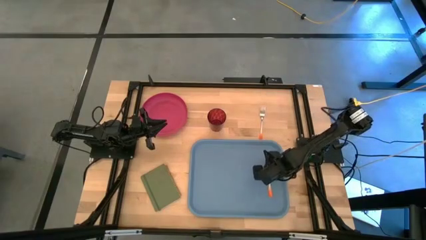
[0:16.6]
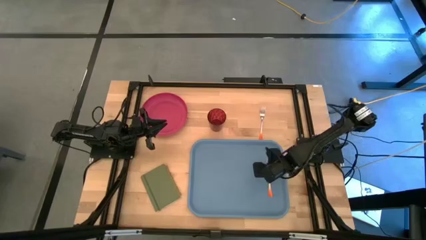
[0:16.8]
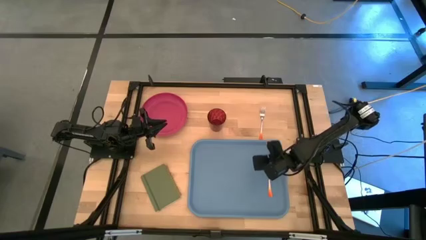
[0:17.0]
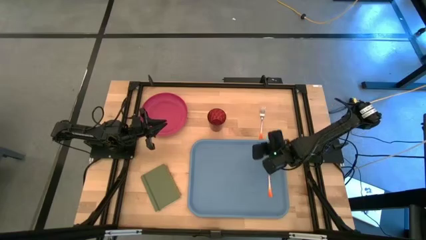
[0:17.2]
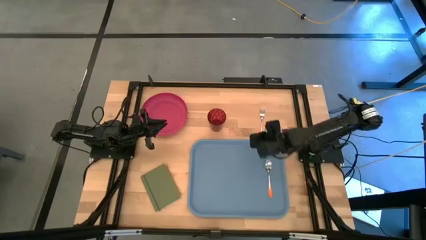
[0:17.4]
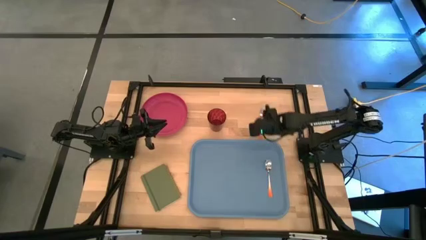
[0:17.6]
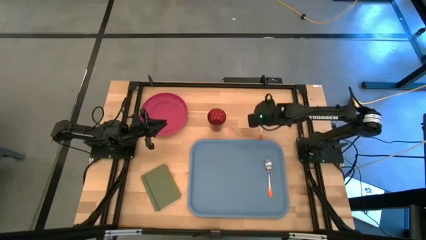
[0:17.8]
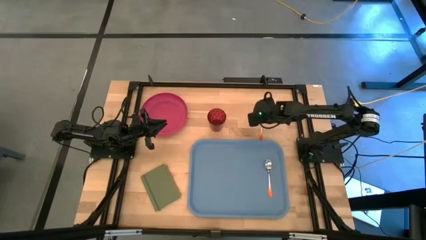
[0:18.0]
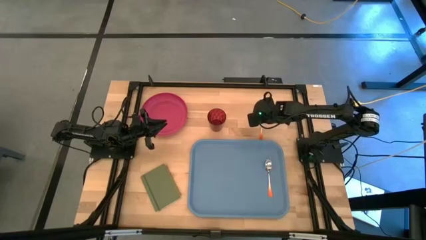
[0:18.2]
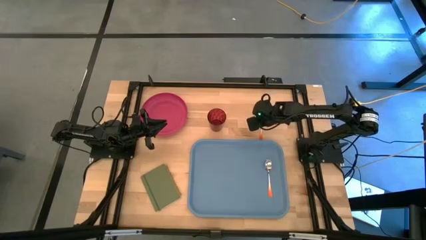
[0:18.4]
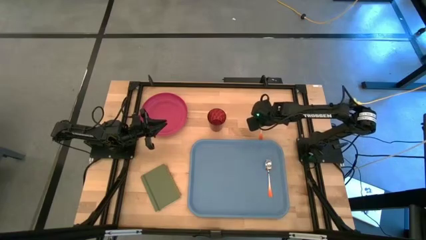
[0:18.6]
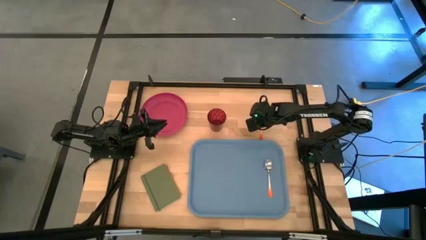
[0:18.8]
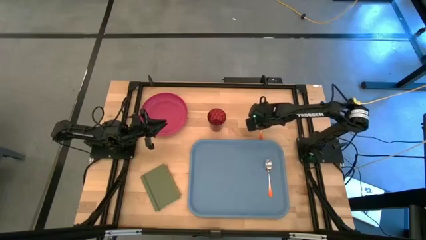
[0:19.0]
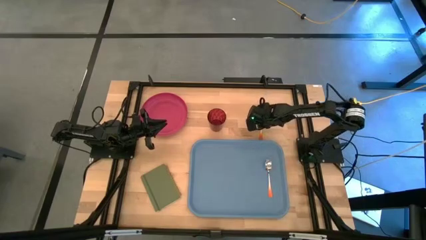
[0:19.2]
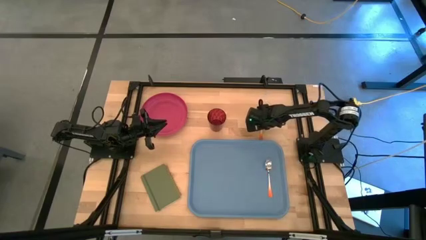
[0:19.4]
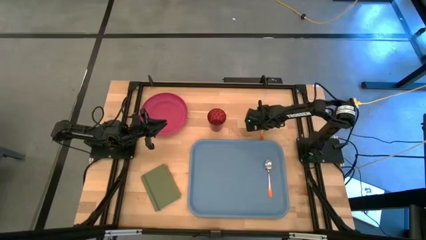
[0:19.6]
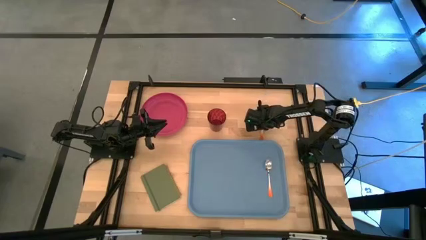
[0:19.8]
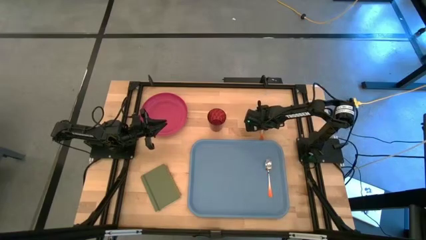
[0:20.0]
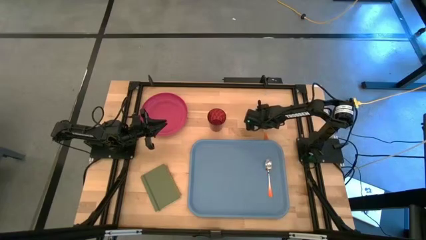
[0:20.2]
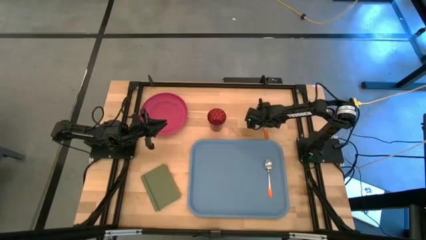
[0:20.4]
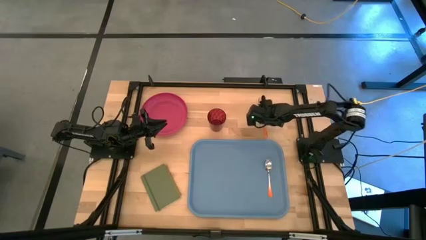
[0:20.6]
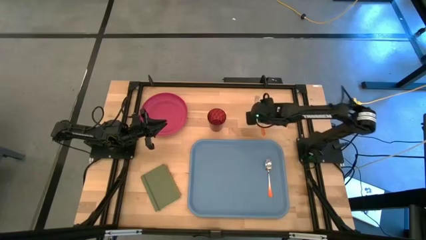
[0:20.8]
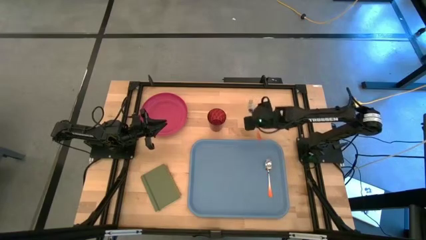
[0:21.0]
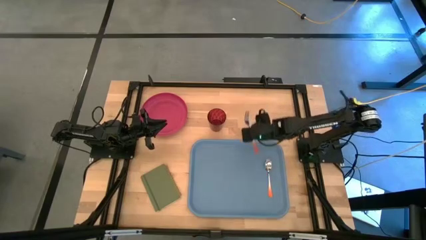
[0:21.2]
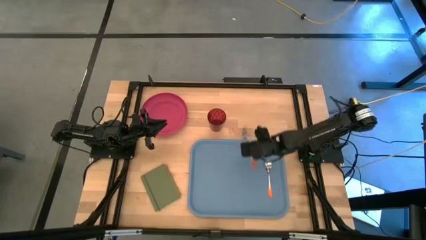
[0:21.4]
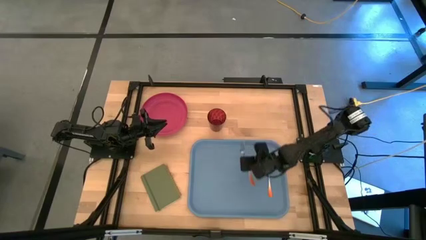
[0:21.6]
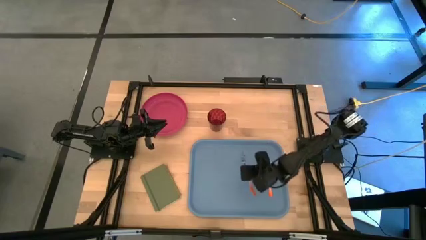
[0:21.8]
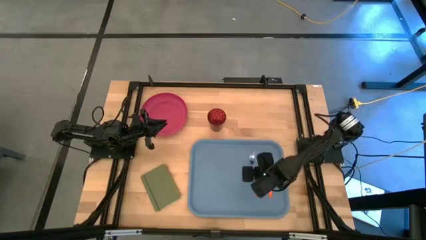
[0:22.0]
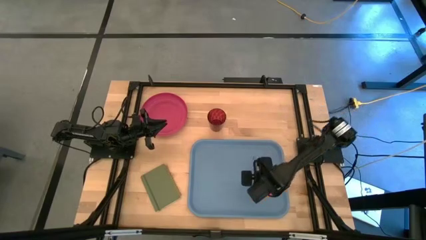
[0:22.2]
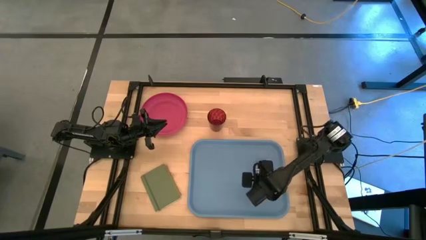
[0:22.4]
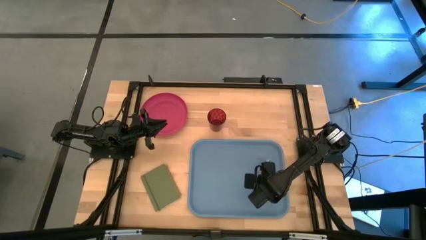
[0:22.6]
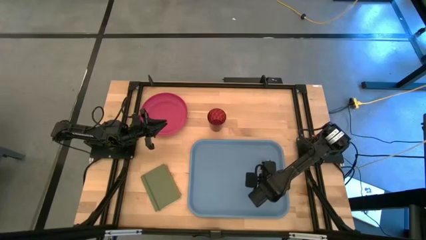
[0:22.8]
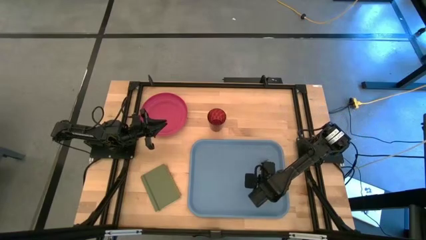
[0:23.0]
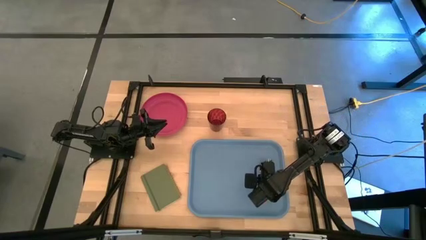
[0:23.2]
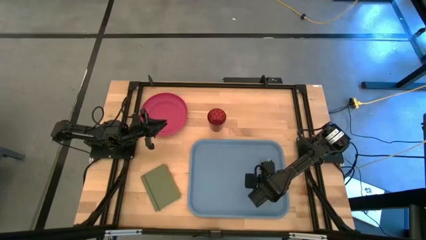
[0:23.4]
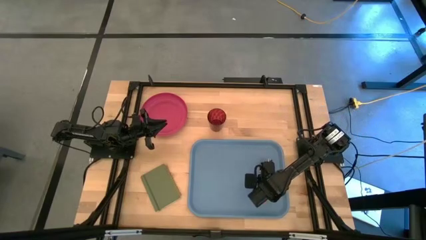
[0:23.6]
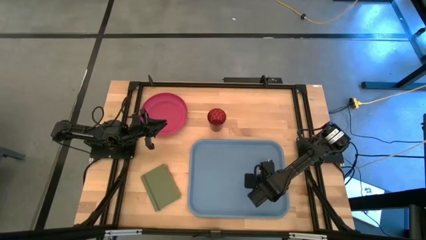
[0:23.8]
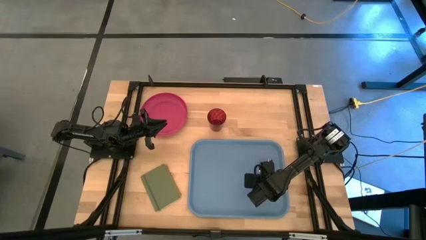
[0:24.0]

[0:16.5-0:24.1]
Task: Pick and place plate/cup/fork/spoon on tray
Put the orange fork on the blue serving tray to the left of the orange spoon

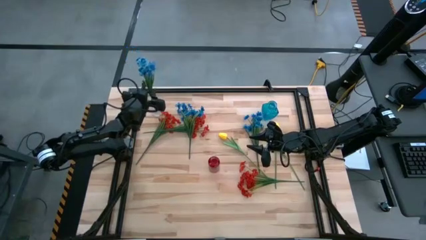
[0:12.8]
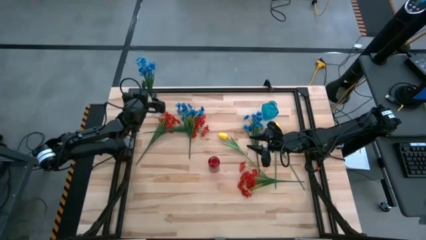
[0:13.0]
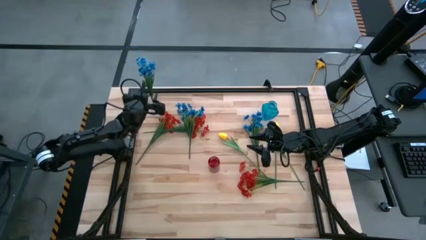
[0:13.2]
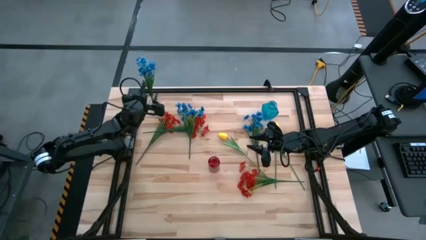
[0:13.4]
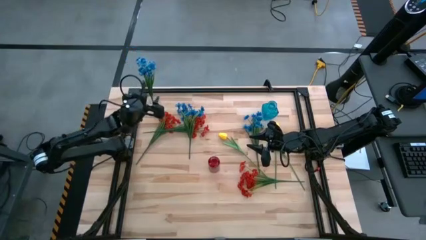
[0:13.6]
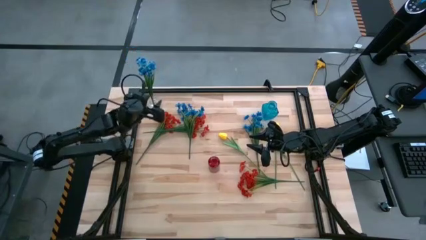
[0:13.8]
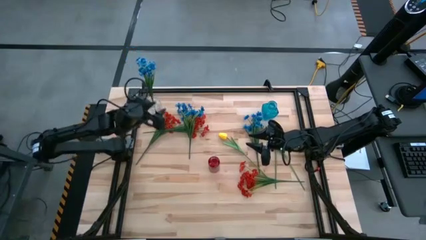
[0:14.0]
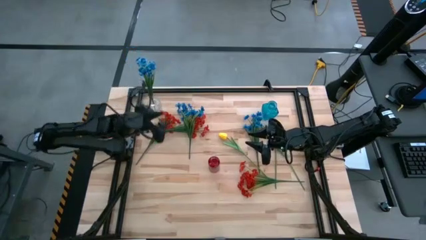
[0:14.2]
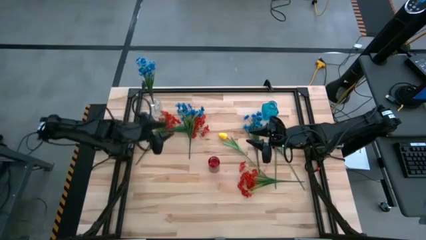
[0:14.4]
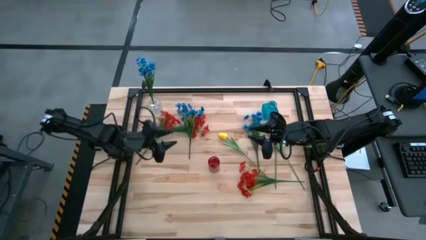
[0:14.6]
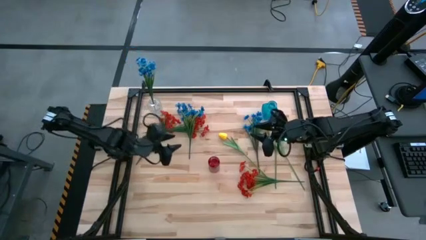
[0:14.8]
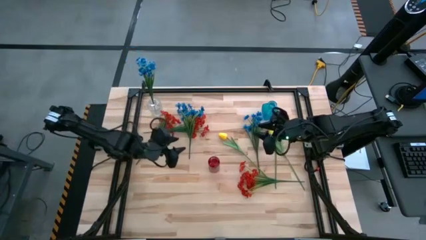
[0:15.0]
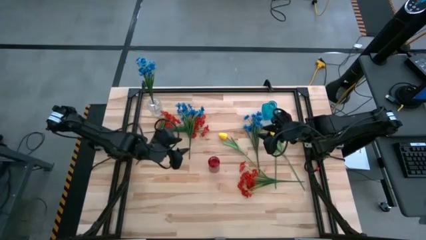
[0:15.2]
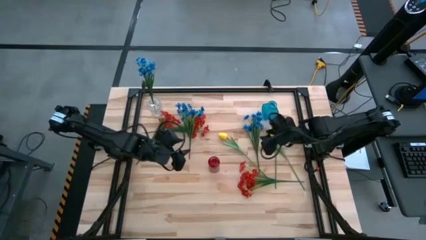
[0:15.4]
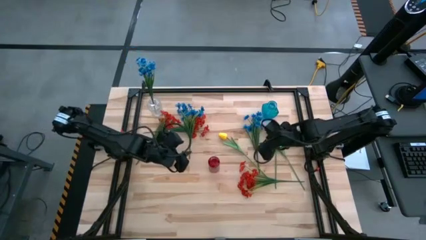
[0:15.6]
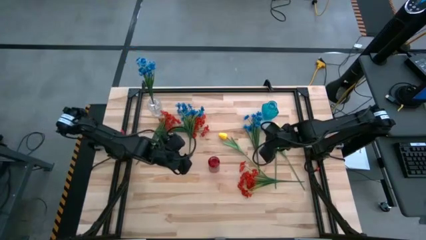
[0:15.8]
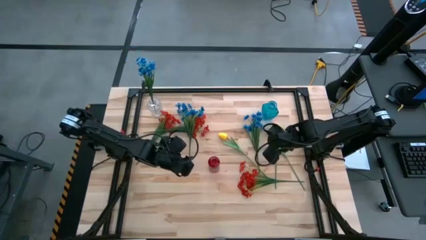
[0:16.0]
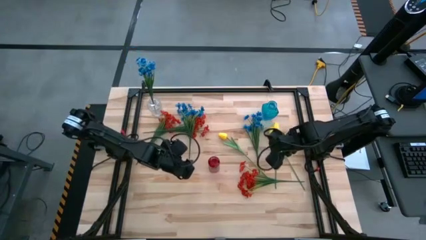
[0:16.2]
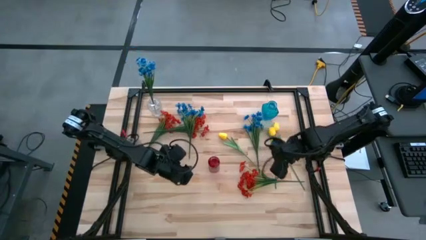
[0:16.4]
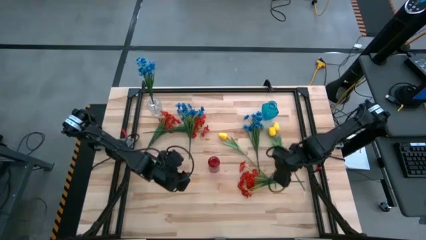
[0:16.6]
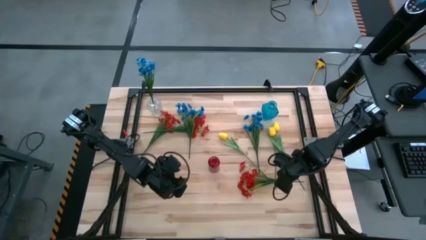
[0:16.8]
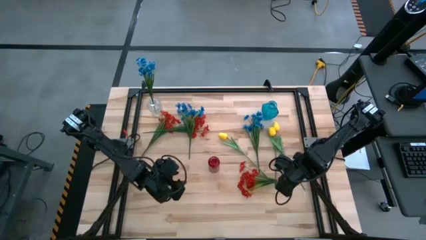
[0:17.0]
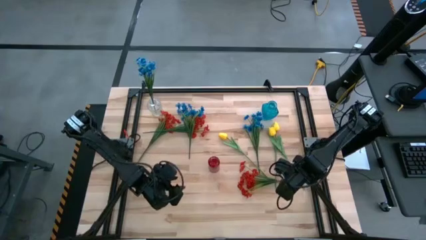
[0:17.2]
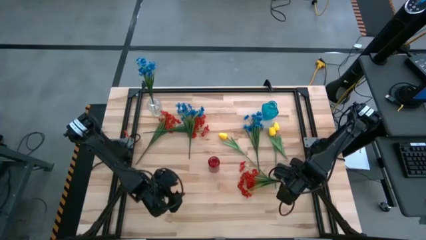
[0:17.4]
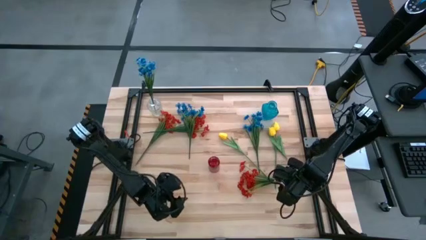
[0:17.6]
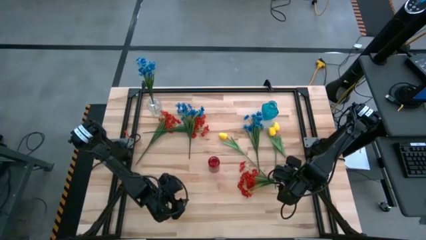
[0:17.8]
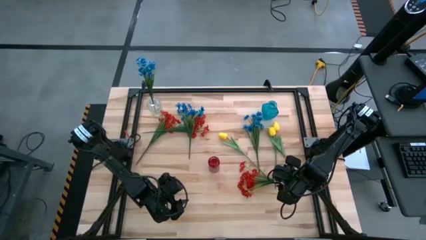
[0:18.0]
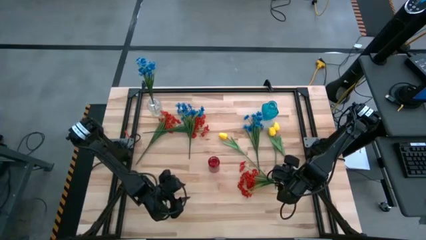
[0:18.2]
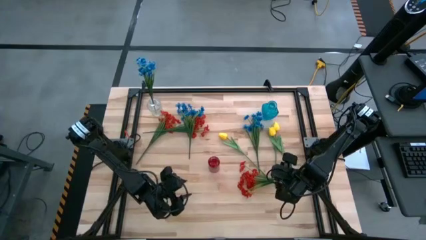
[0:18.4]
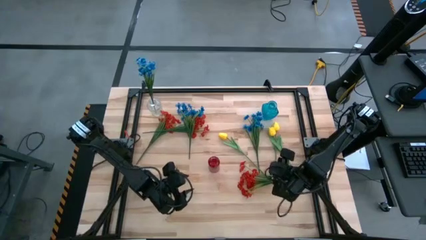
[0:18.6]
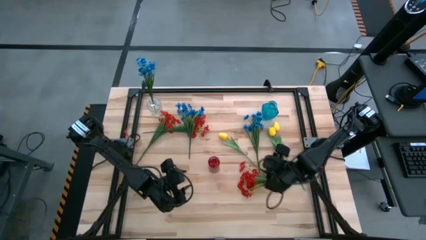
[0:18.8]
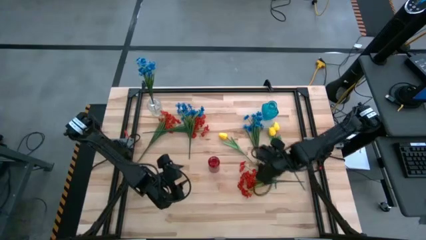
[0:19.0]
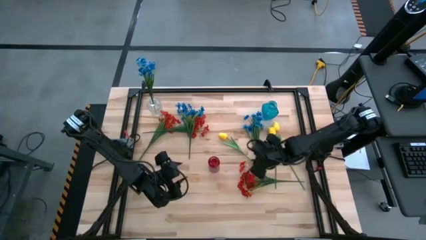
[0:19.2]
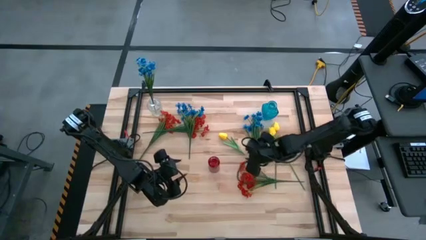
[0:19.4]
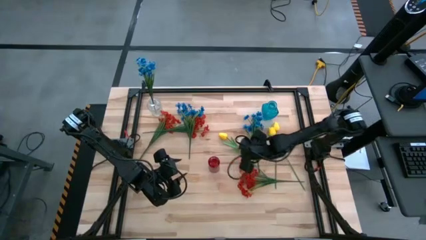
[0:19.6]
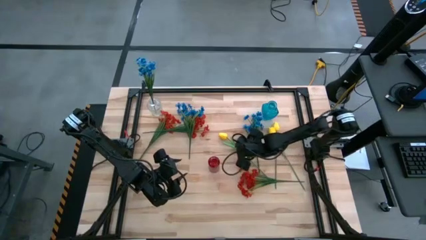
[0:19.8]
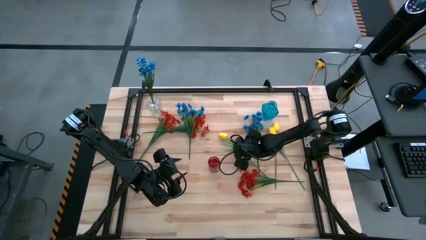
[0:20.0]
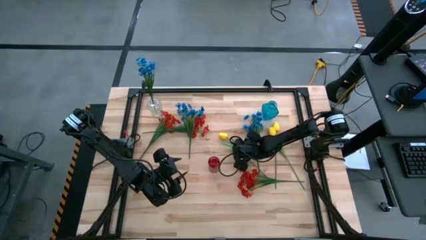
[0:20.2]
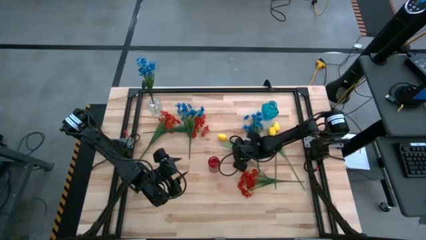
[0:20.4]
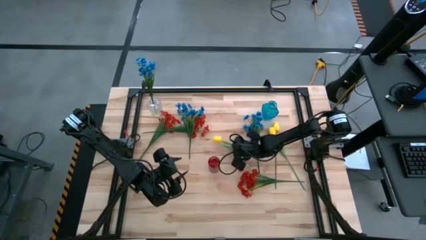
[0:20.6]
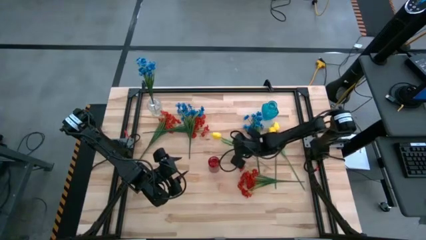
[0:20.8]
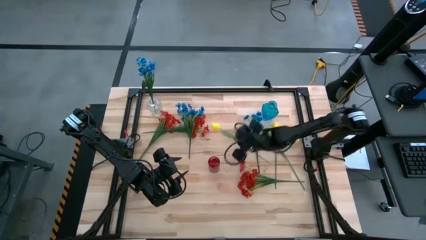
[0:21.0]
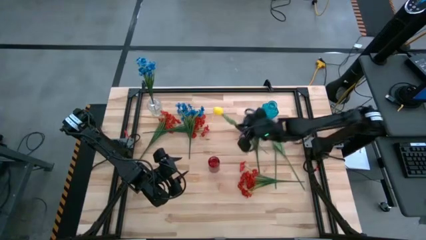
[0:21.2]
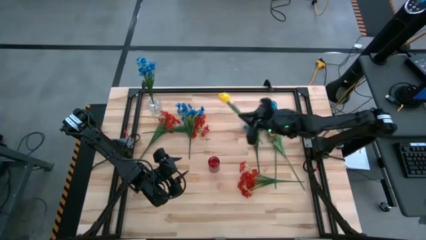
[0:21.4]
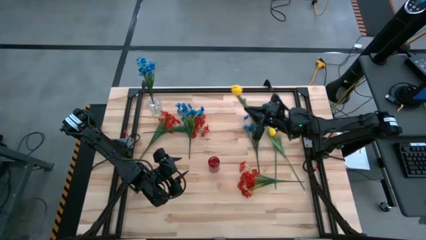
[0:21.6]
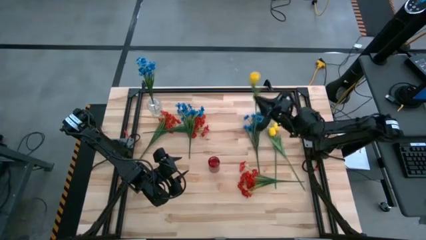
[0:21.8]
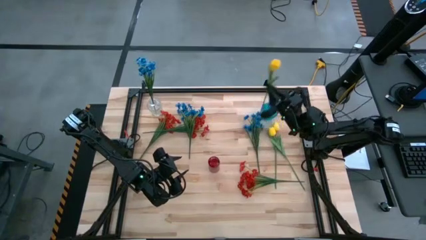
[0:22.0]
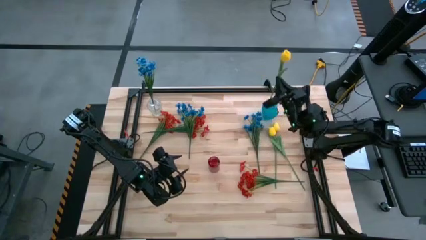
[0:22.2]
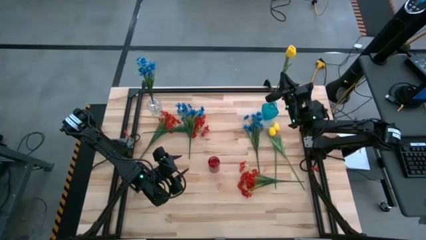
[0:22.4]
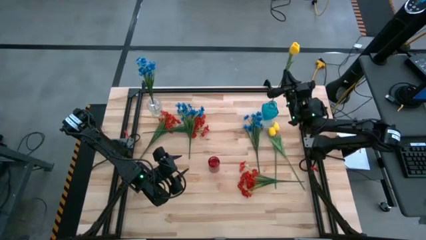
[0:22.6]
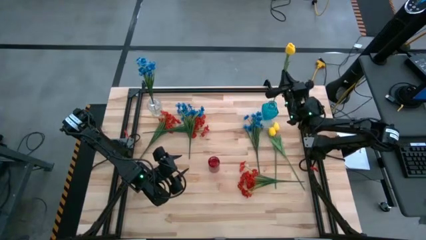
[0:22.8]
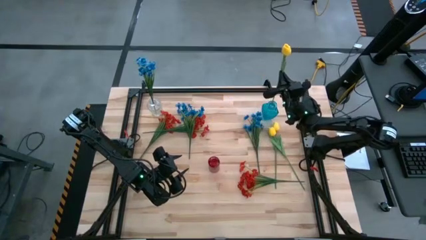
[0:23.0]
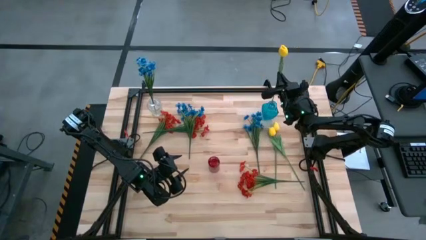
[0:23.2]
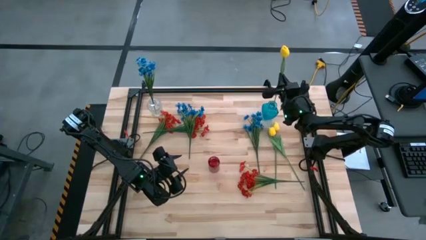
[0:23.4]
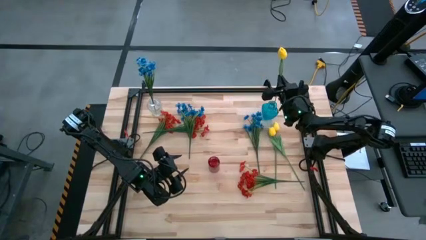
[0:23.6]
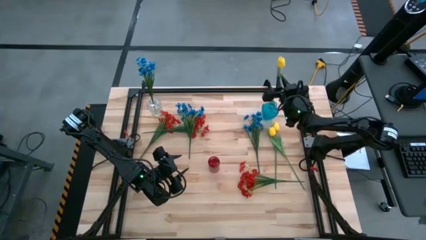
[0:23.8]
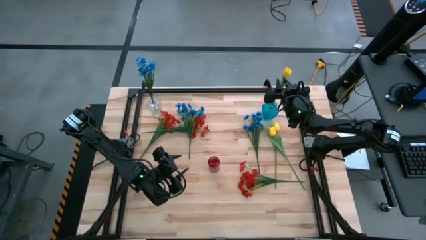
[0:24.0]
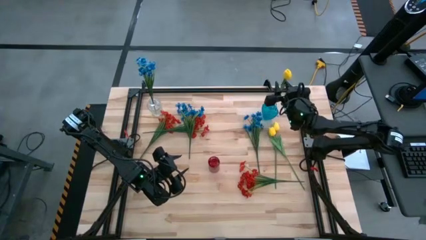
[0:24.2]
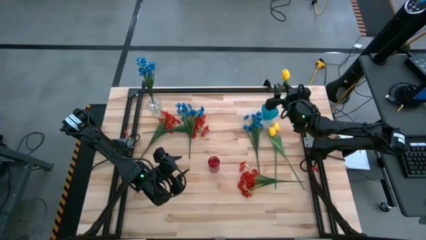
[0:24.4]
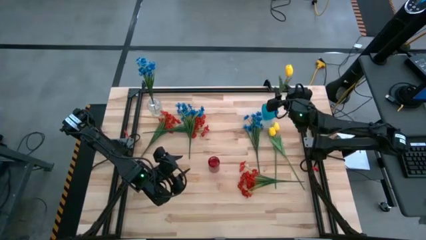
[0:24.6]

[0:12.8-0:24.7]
Task: Sort flowers into vase by color
Put the left yellow tulip into the blue vase
